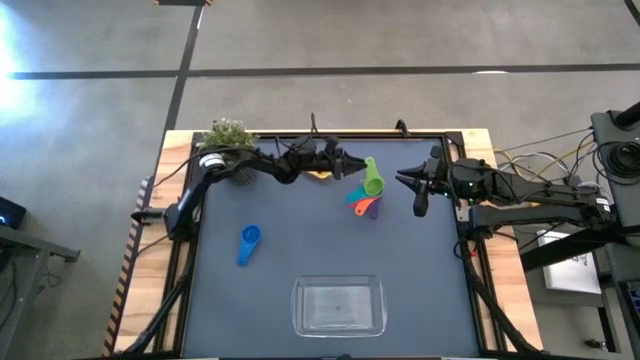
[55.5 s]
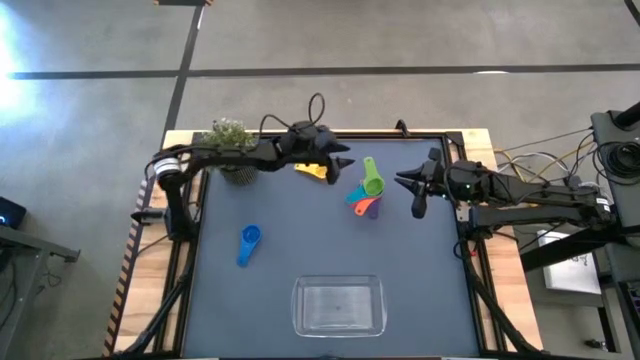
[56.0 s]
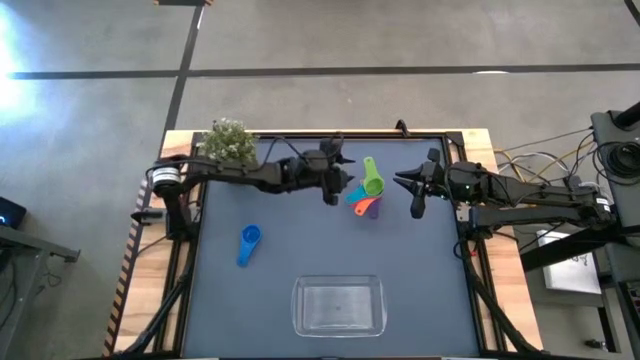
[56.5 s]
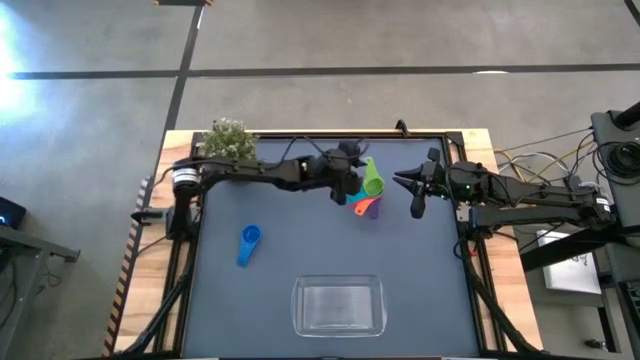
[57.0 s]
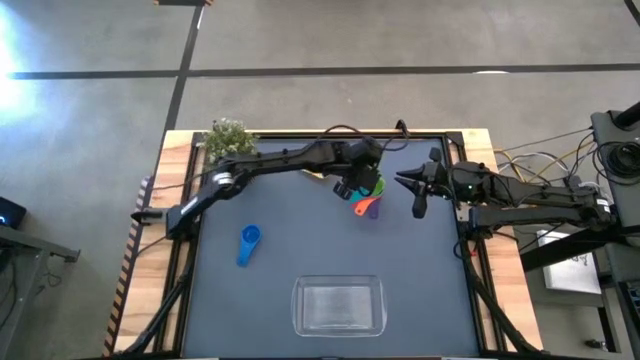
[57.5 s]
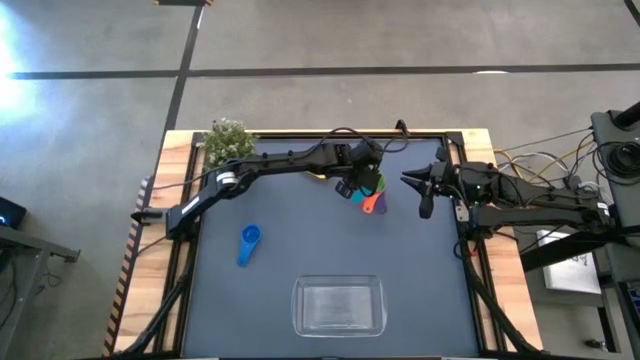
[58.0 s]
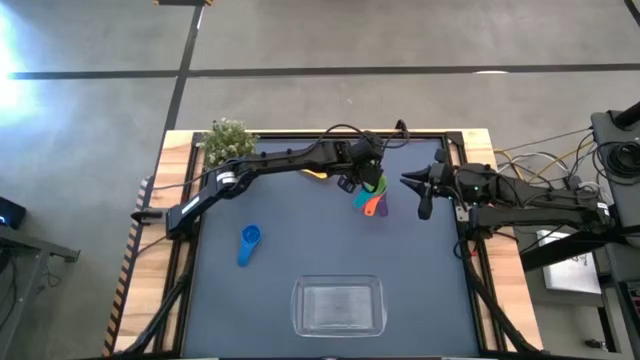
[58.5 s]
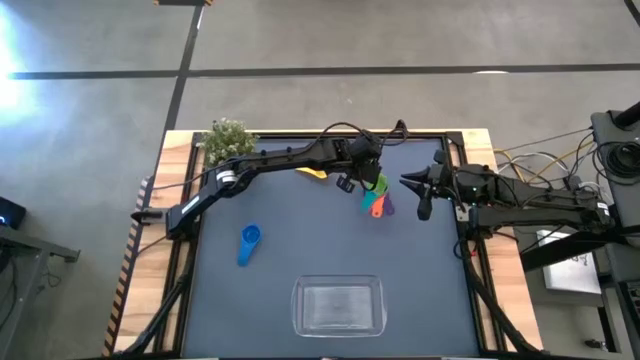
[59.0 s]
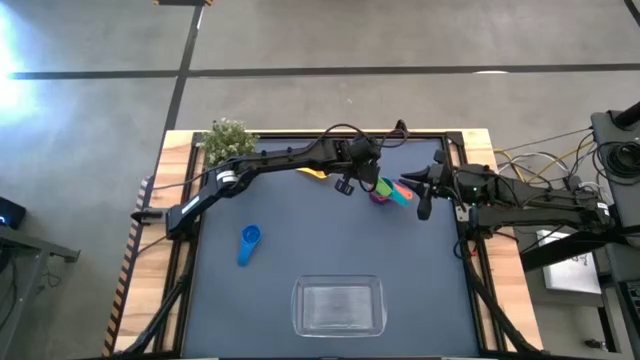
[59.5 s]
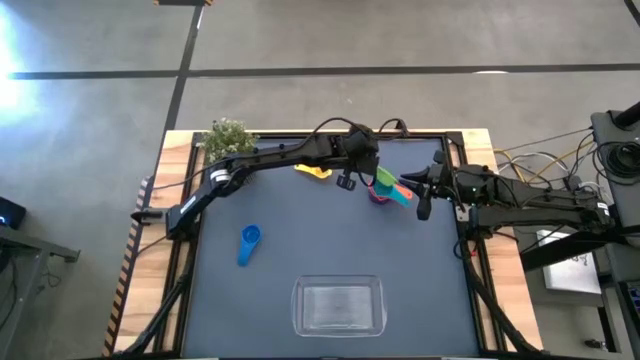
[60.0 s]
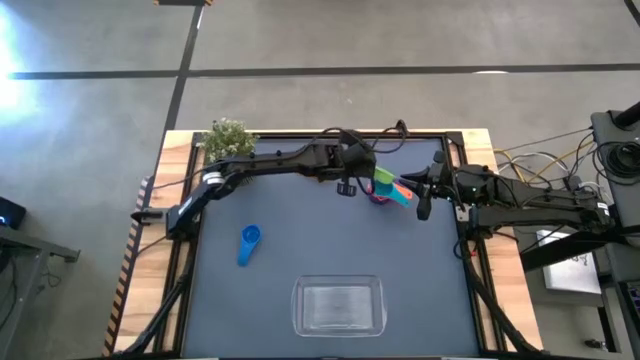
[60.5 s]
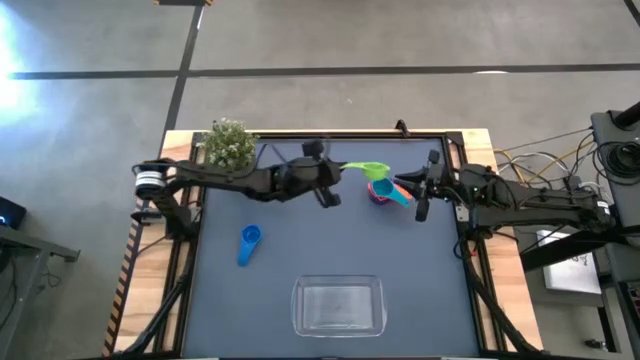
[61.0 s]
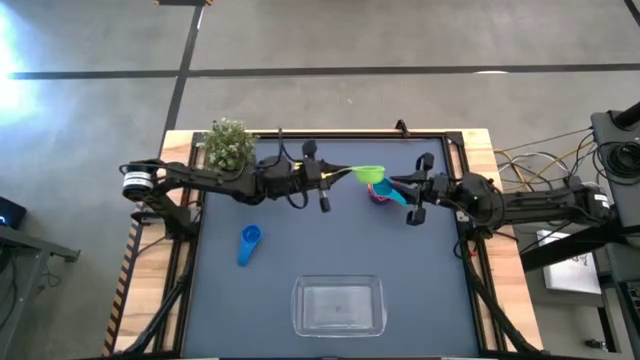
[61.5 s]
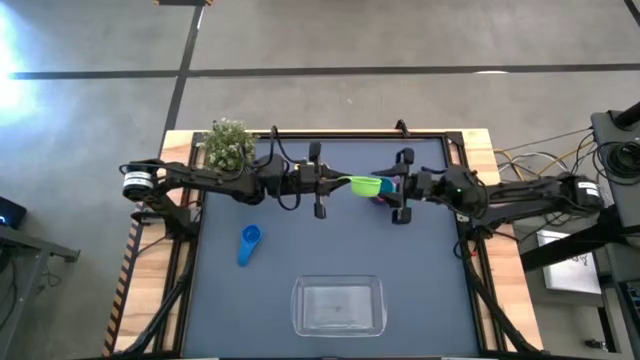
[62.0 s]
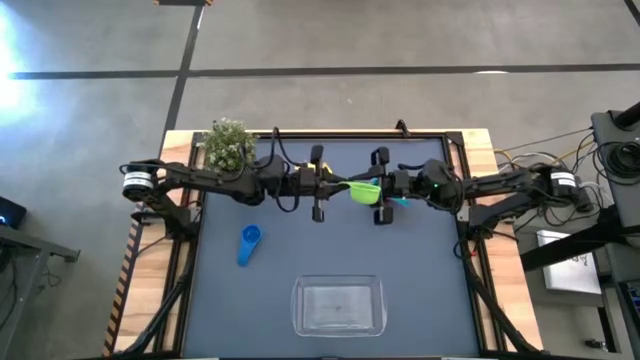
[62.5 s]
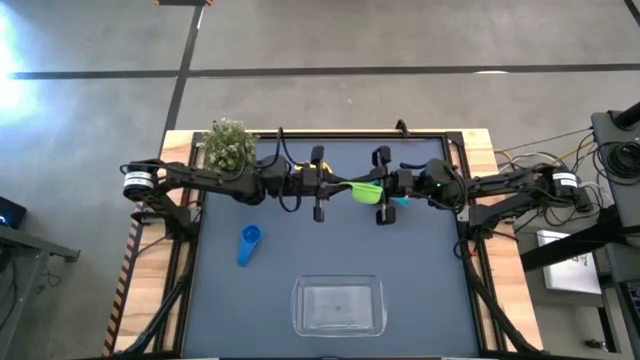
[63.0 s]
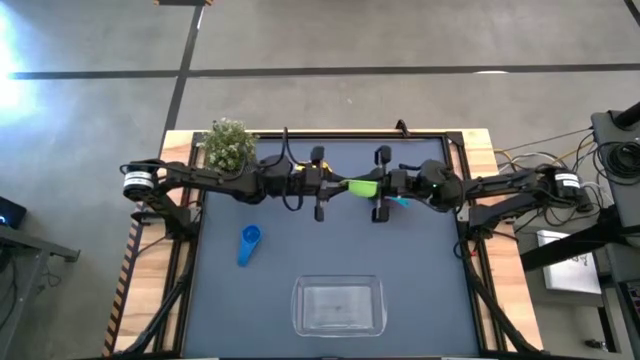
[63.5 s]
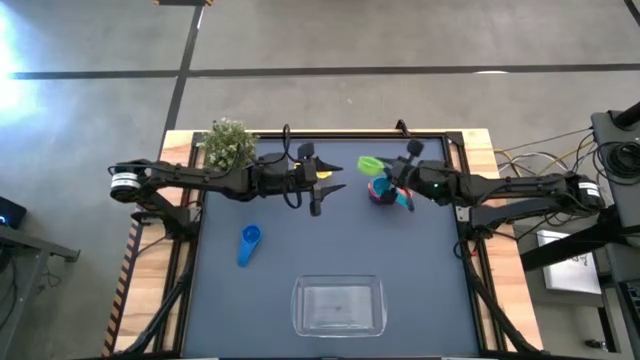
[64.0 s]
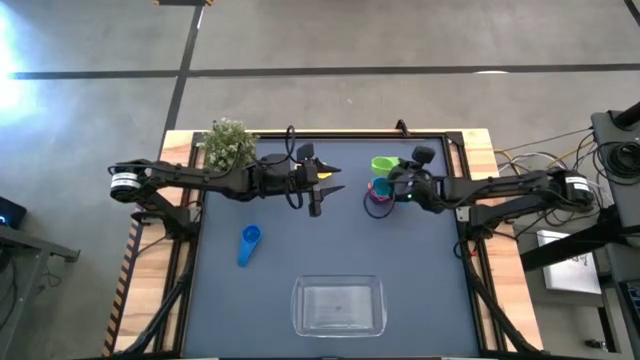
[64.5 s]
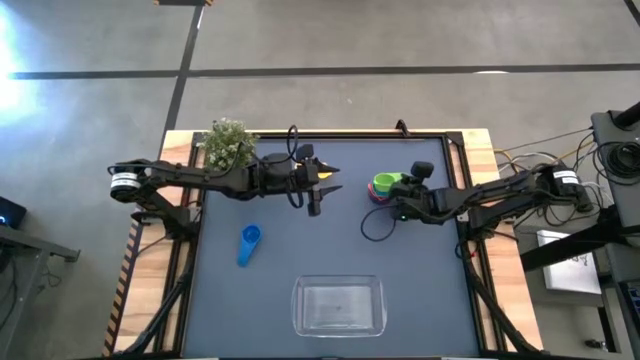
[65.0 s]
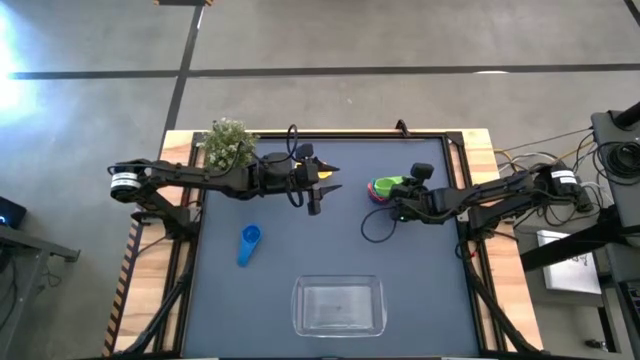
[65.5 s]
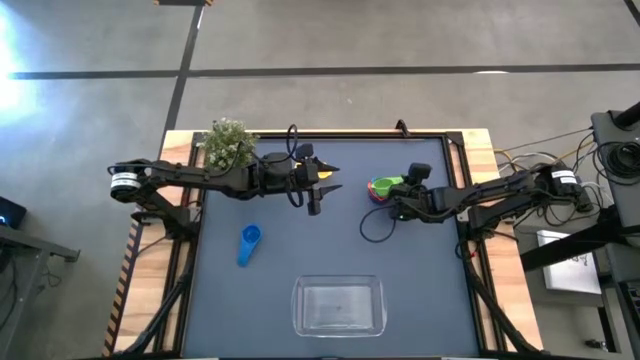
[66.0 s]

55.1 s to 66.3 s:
Task: Nest measuring cups in basket
Stack the green measuring cup on the light blue measuring cup

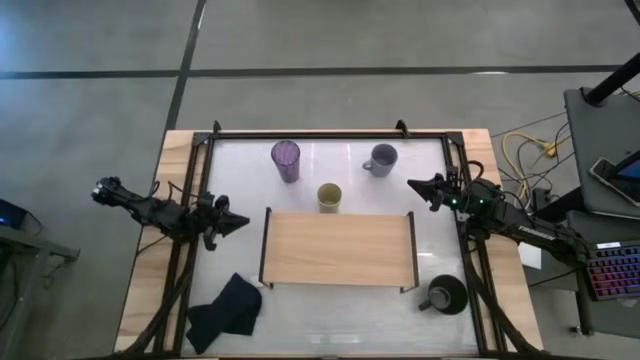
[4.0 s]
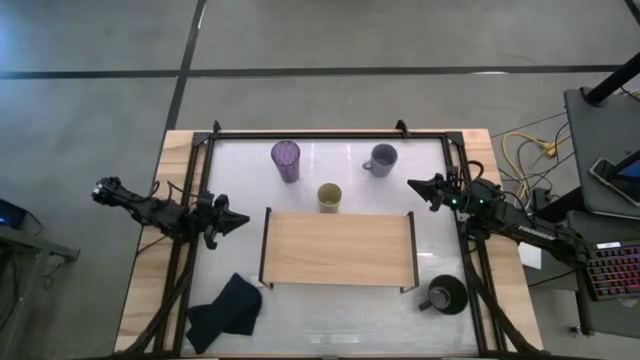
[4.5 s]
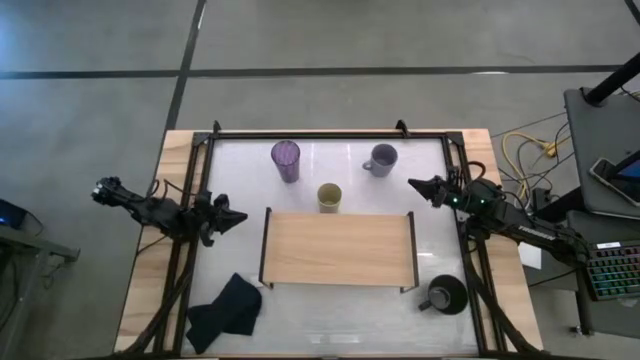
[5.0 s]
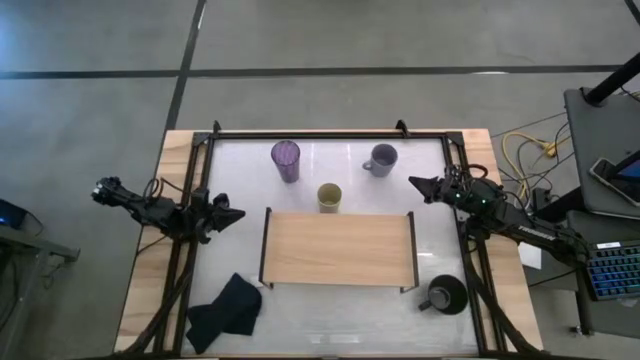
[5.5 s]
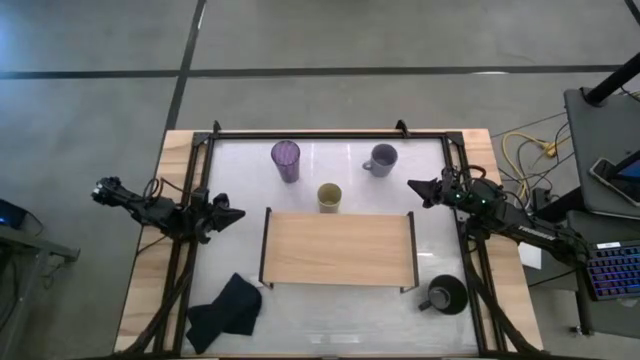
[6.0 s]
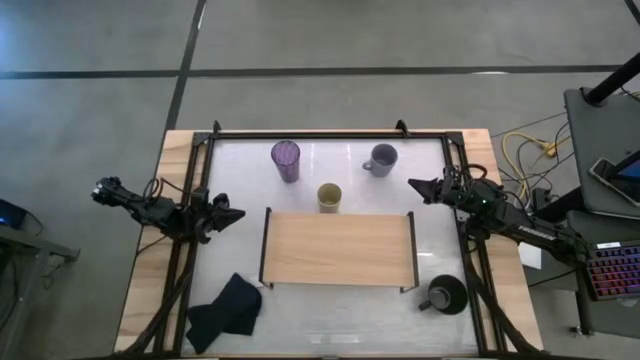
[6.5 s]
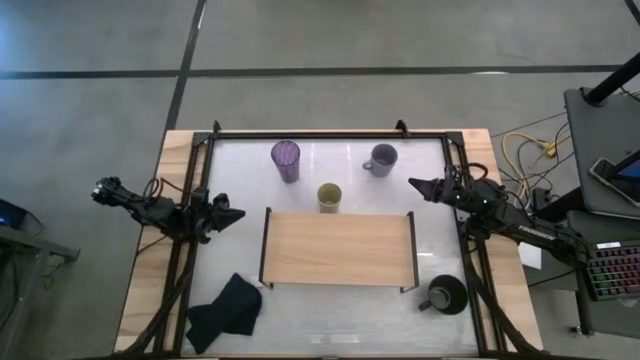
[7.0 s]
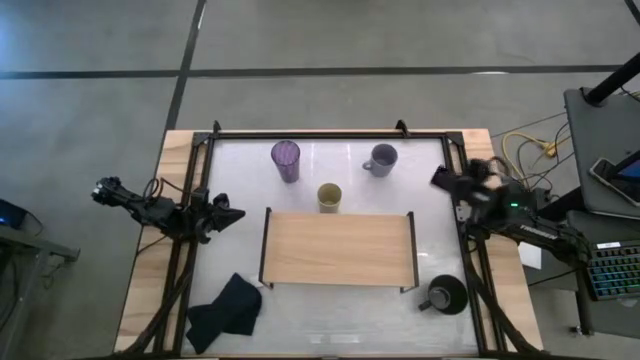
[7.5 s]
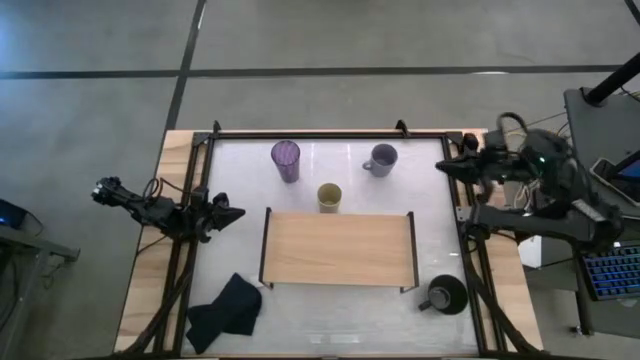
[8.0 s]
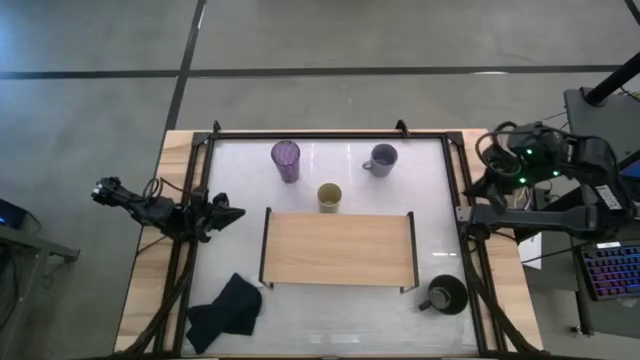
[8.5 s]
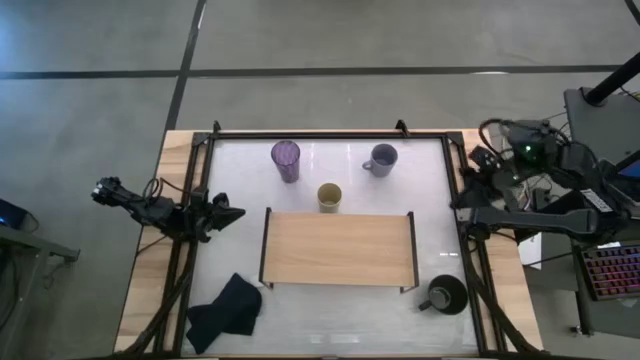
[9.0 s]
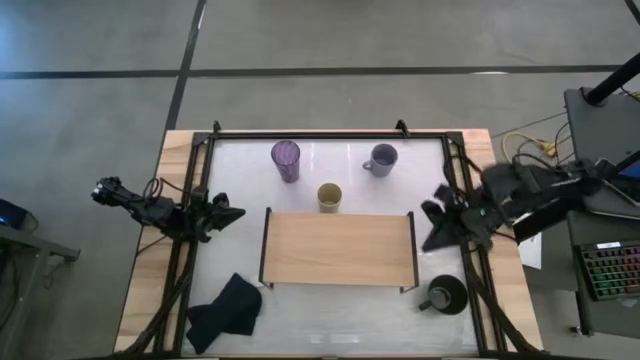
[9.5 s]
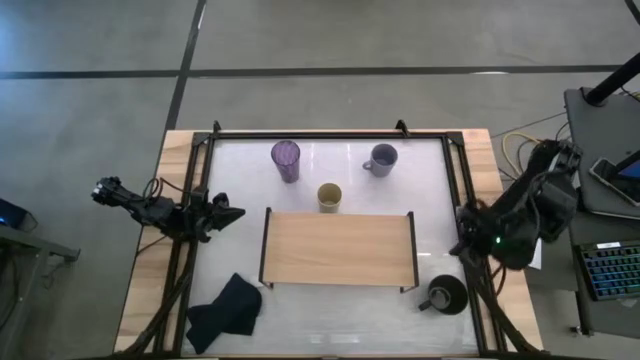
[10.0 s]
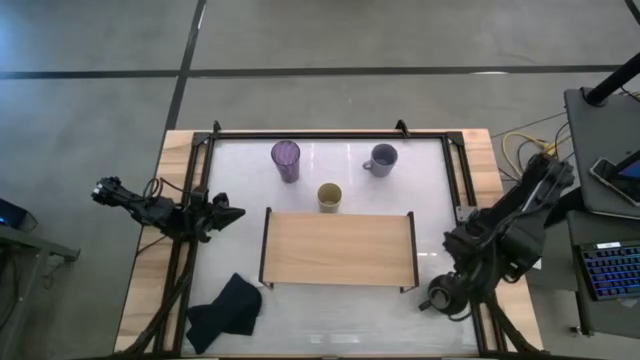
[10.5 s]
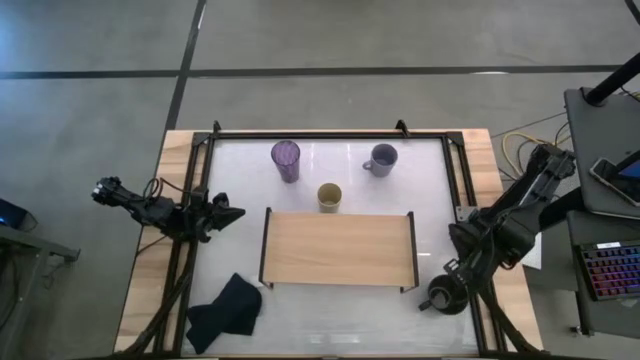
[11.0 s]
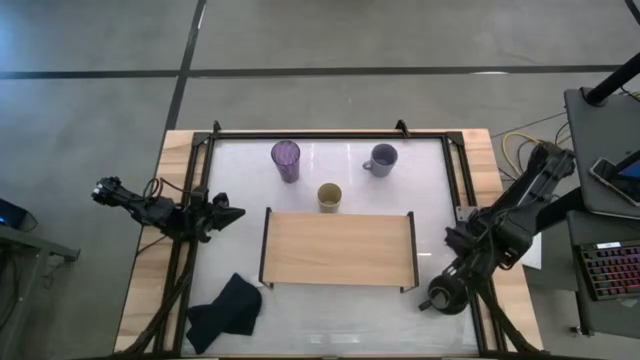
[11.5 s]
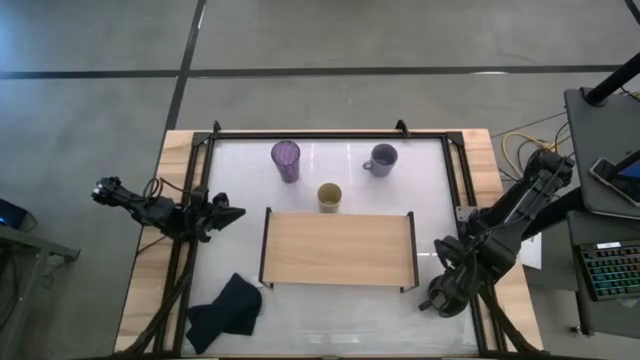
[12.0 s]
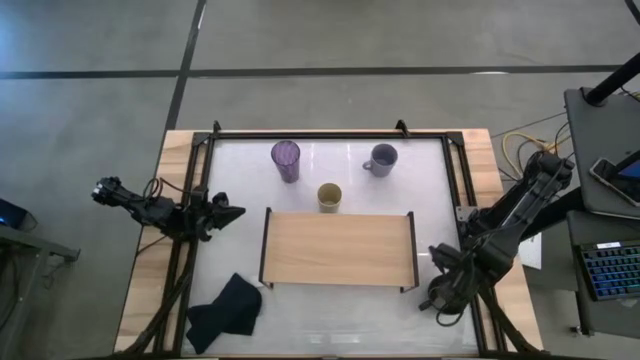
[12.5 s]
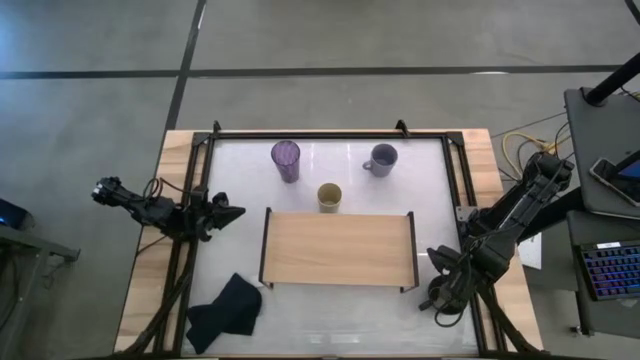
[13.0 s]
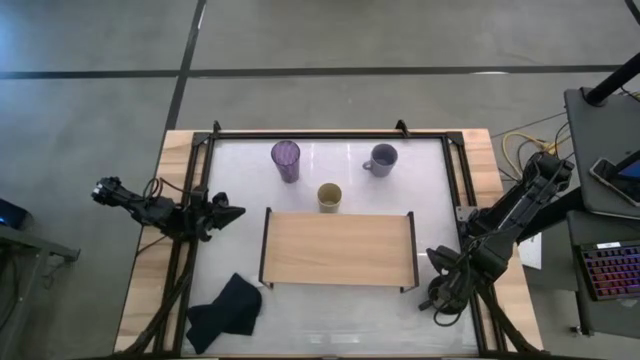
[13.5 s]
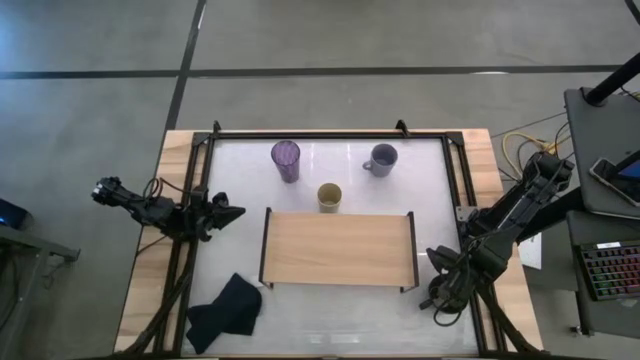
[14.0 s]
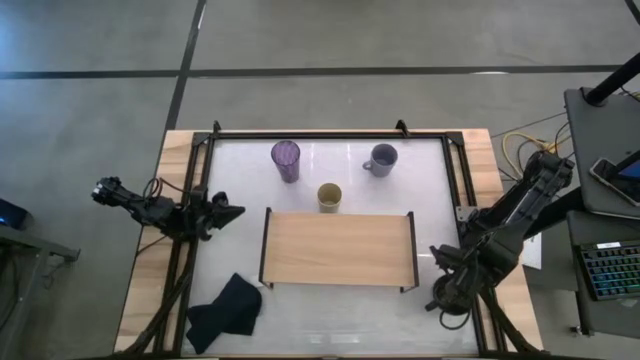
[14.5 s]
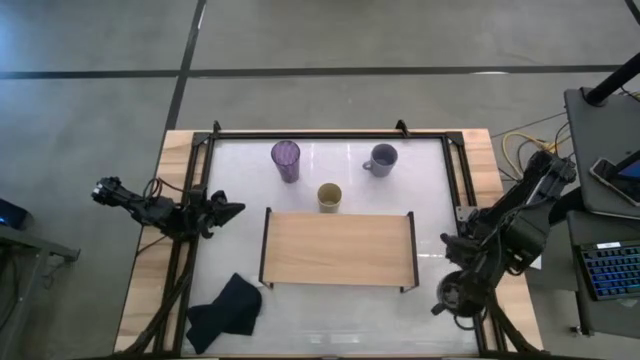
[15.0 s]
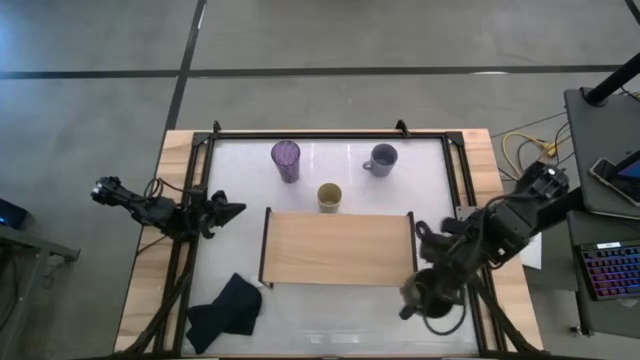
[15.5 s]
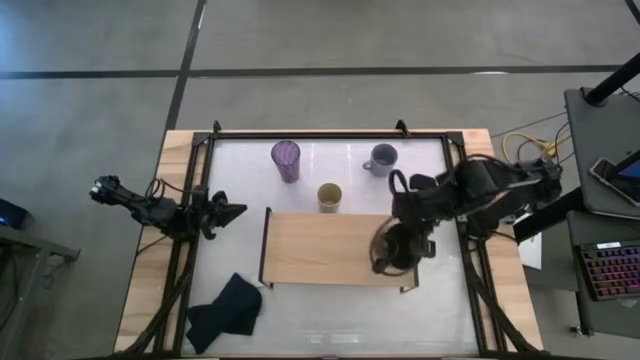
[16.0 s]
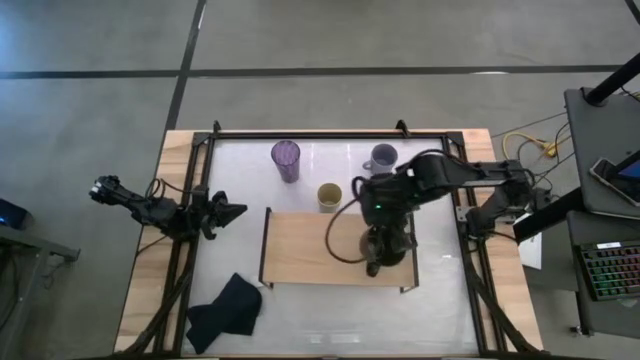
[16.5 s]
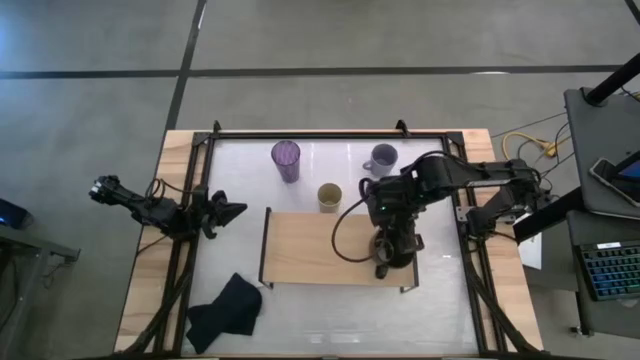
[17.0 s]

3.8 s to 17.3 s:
Task: Stack small to large cups/mugs on shelf
Put the black mug on the shelf
